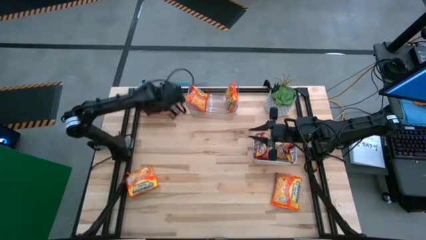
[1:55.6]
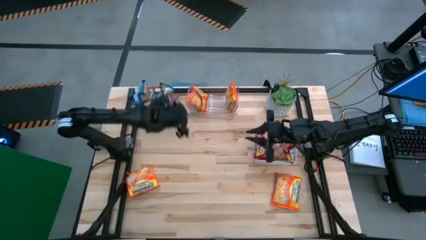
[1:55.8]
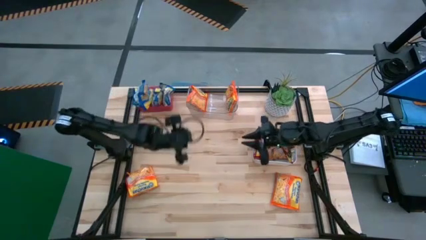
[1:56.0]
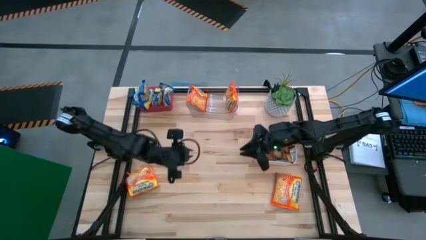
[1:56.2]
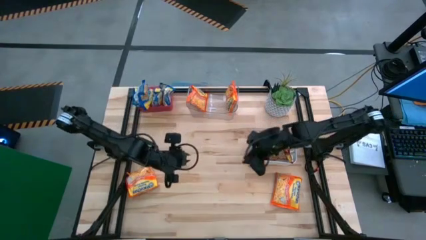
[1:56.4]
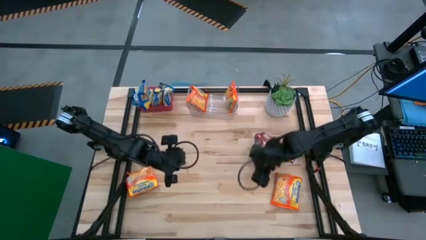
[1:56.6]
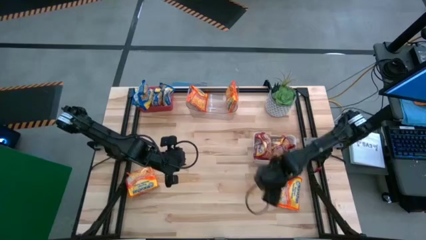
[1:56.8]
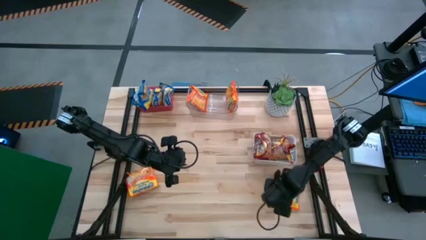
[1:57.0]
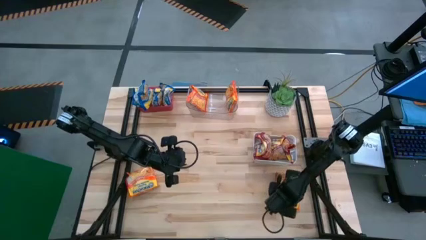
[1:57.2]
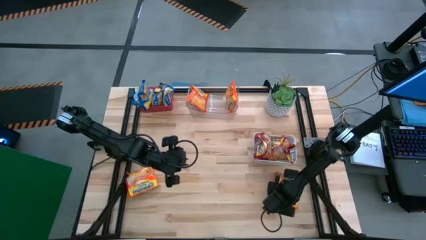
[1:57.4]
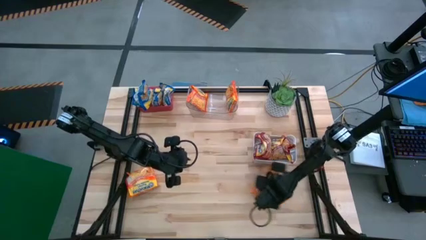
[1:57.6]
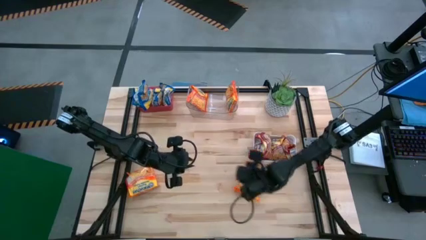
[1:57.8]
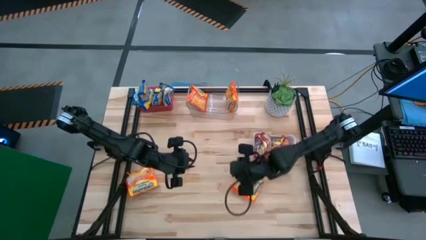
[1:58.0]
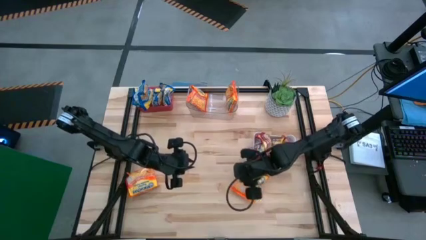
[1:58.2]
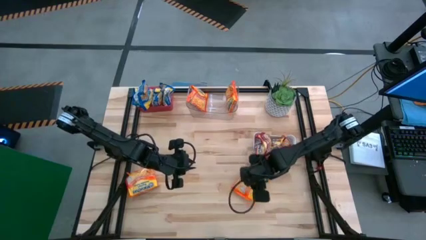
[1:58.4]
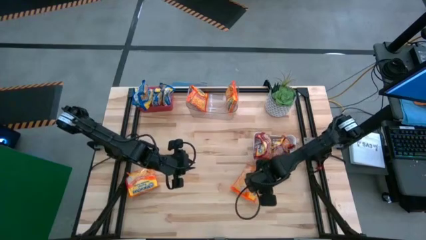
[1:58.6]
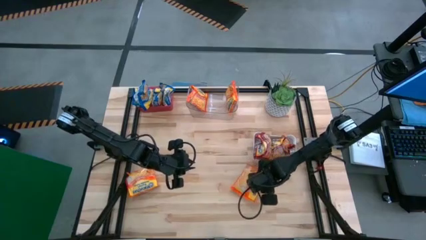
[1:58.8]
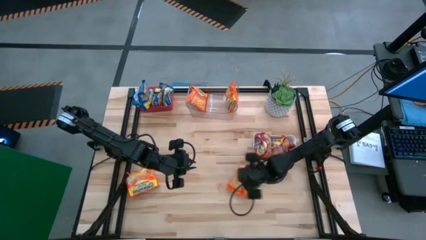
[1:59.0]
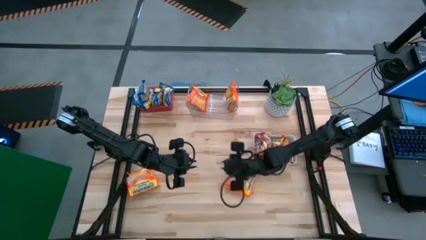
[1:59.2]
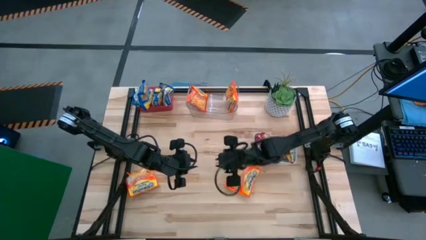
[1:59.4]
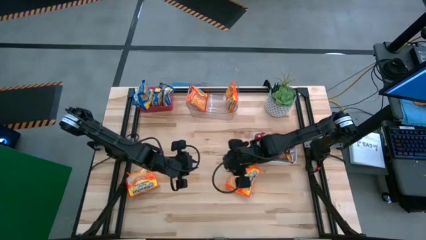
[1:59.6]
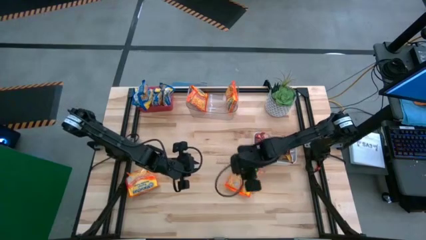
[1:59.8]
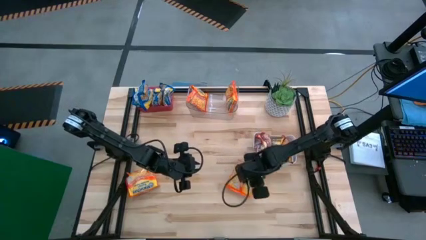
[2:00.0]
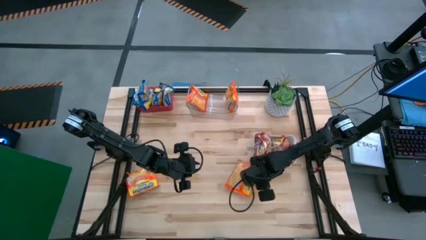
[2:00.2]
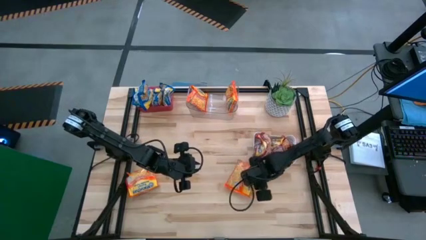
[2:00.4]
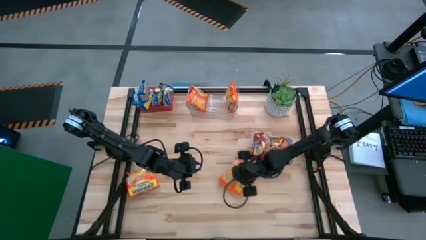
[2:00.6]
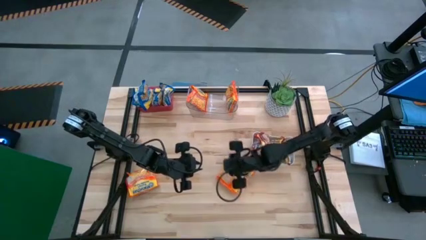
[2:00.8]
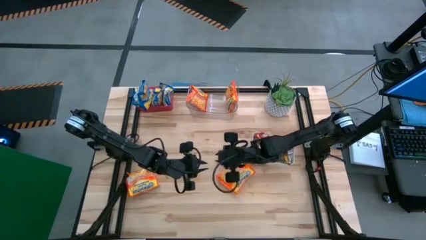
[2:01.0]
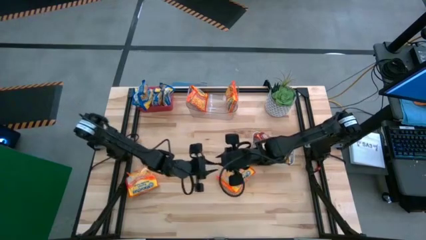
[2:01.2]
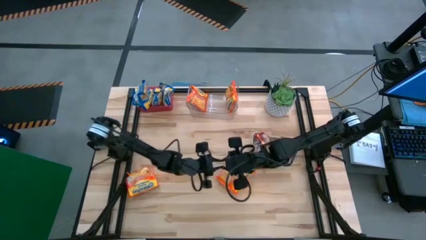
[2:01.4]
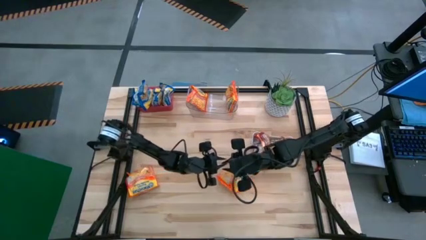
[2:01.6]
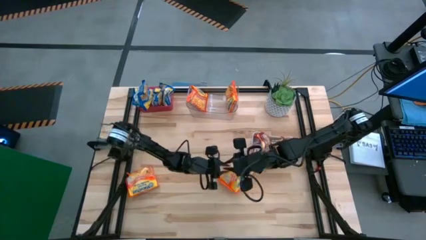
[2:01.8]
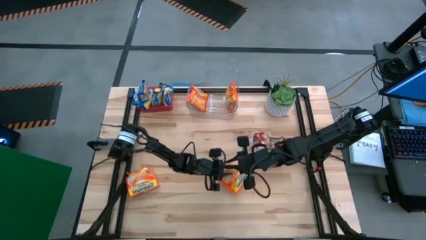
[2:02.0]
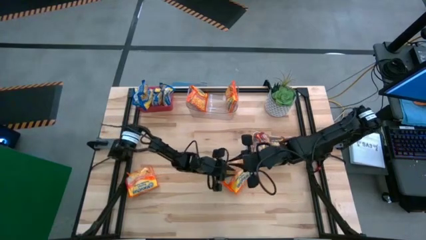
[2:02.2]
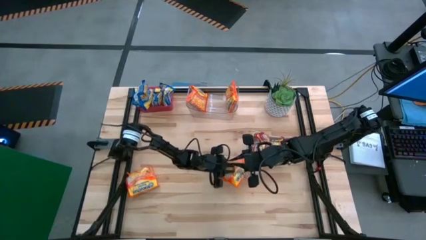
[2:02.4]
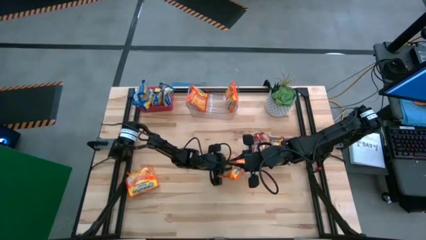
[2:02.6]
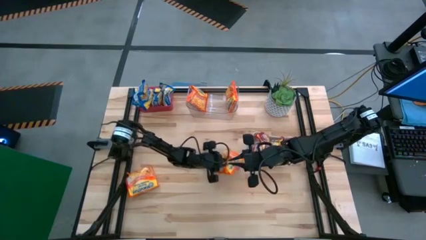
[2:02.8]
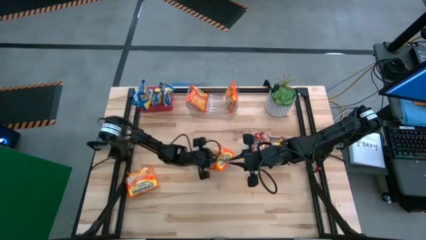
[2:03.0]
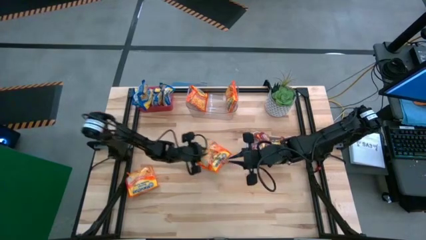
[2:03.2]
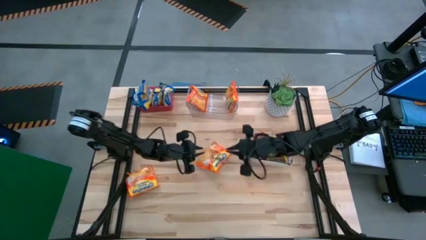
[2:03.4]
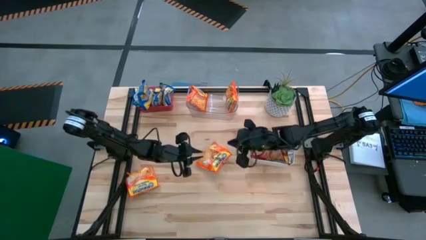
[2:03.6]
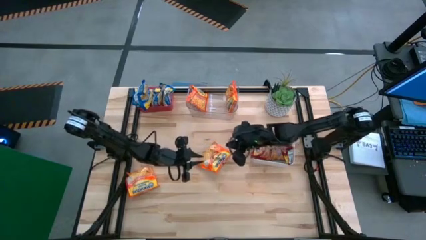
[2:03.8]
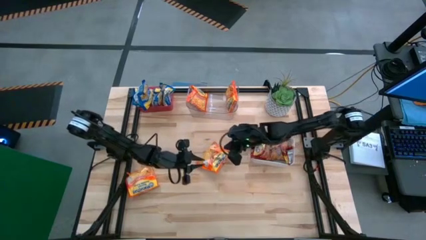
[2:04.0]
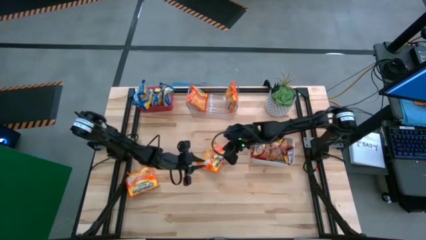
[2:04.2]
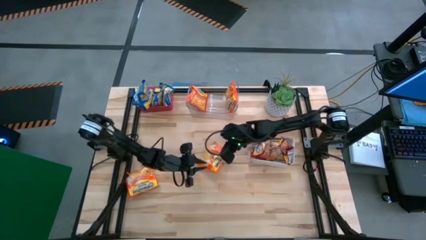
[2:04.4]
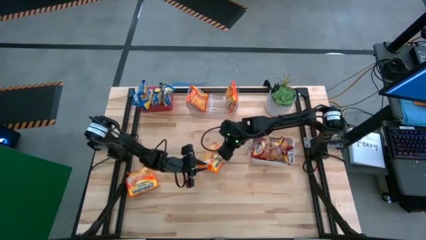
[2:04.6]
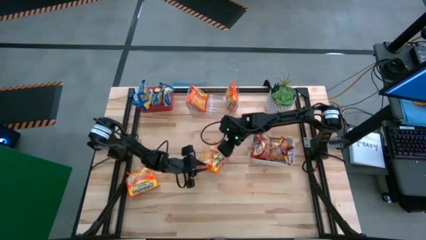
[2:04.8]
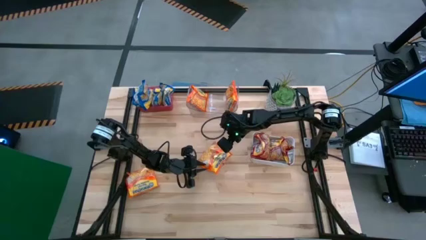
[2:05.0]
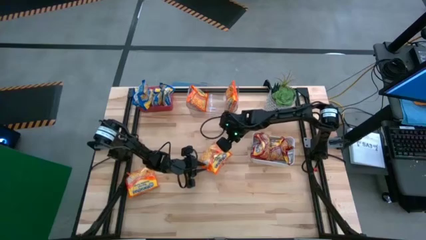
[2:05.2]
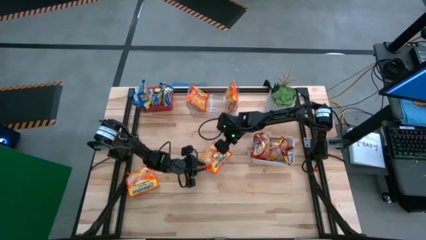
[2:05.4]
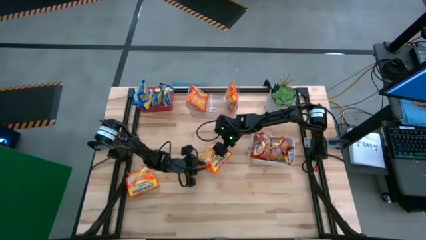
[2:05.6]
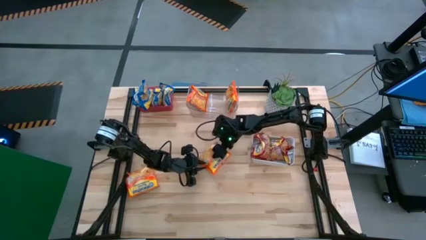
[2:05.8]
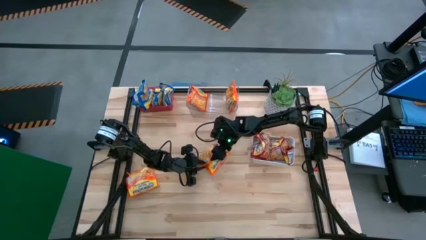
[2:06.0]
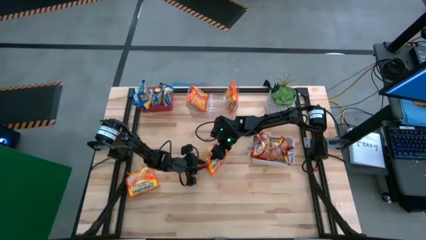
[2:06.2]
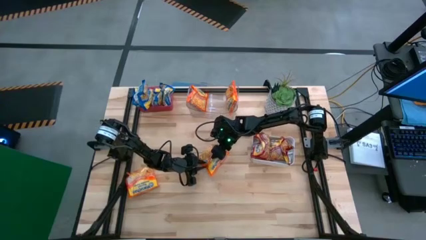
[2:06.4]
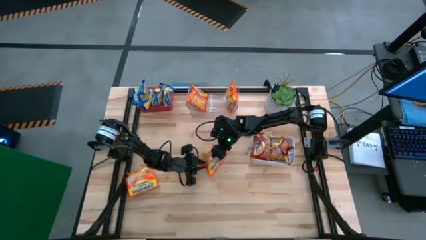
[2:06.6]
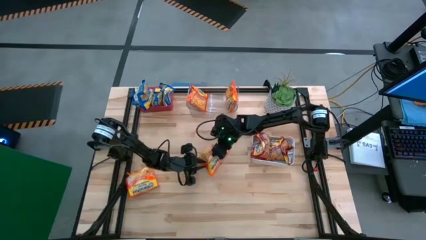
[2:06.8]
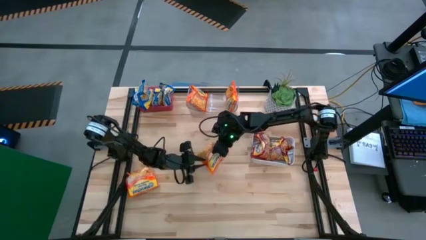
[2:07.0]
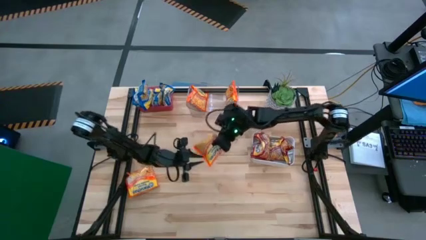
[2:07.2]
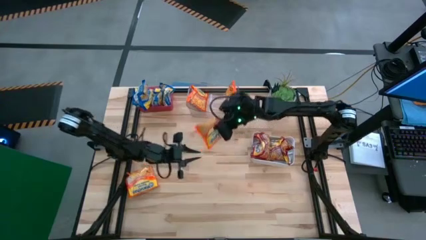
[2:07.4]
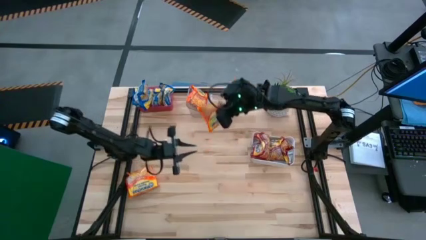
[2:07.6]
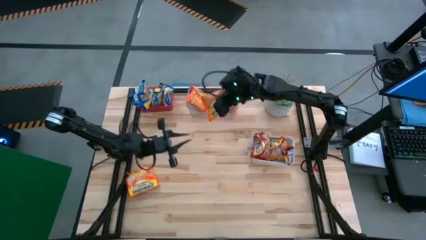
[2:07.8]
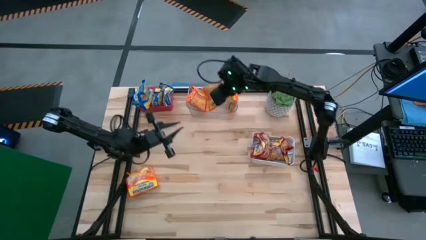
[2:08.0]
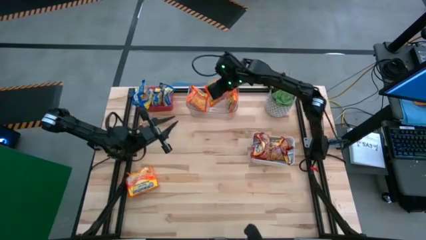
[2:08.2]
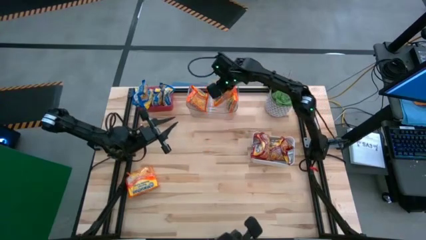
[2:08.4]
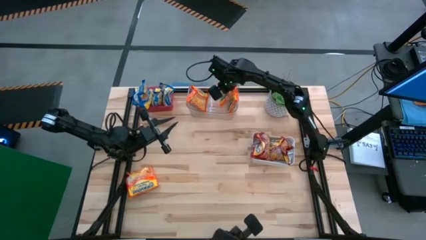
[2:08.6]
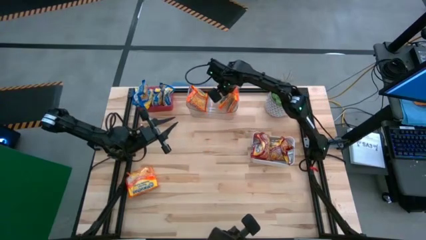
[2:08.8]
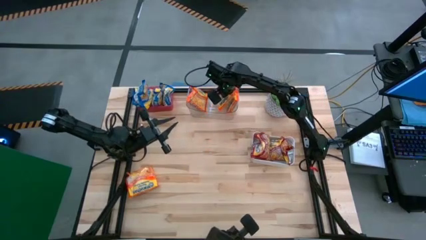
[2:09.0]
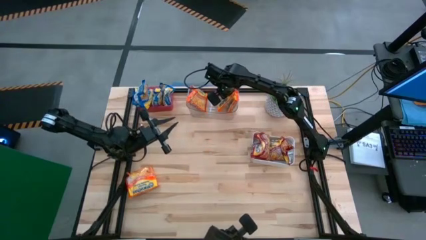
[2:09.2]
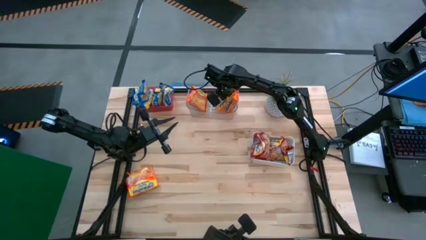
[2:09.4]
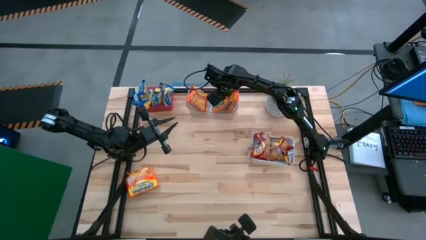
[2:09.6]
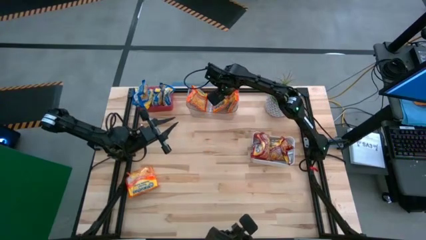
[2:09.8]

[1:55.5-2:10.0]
Task: Sort Maruchan noodles
Put the orange noodle pack into the transparent bin
